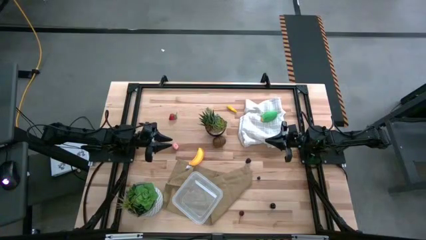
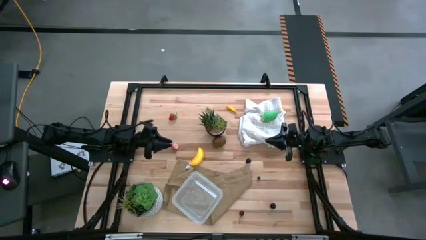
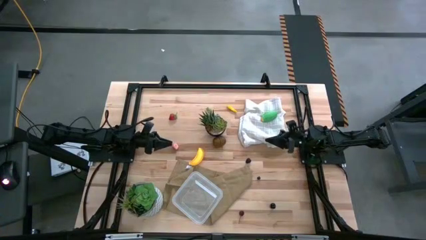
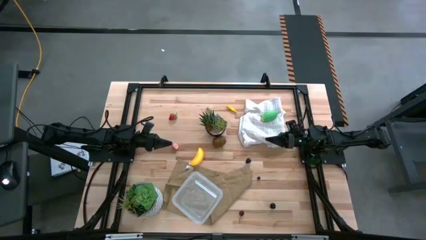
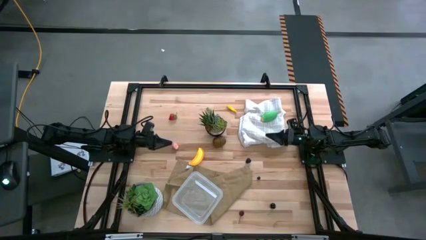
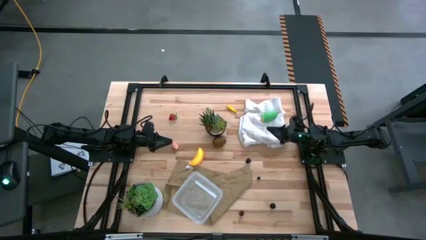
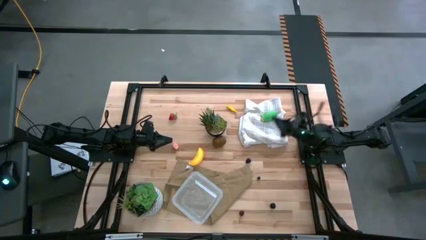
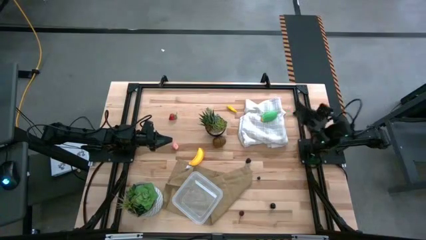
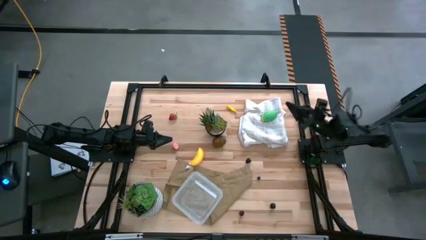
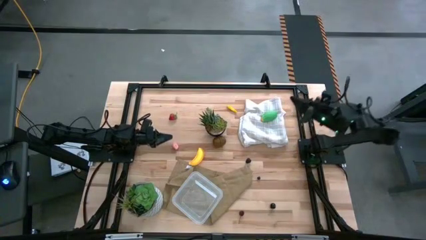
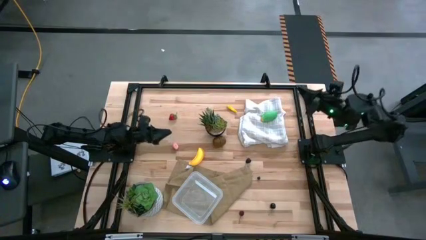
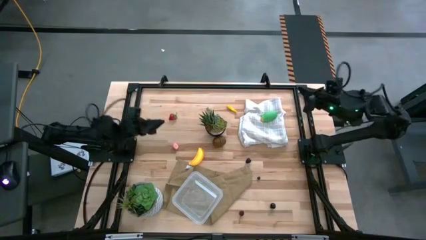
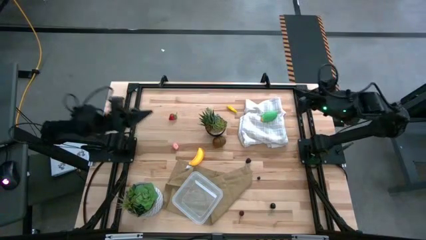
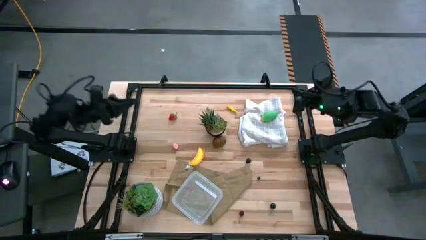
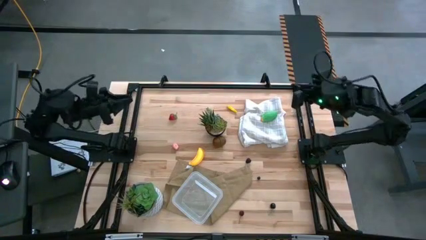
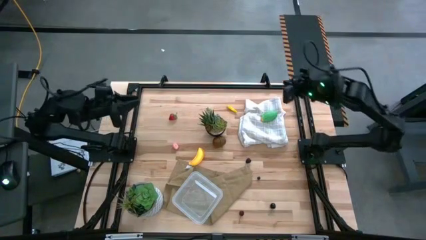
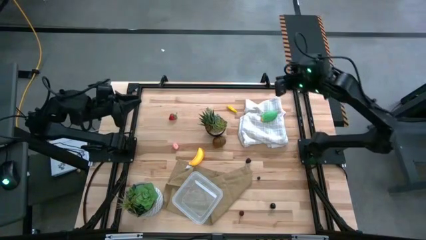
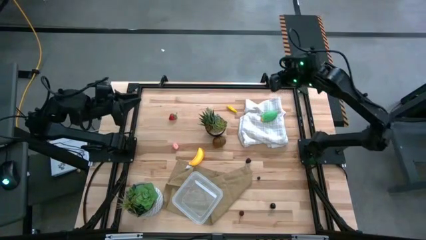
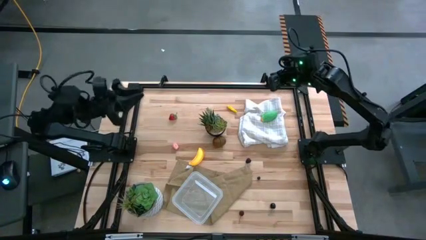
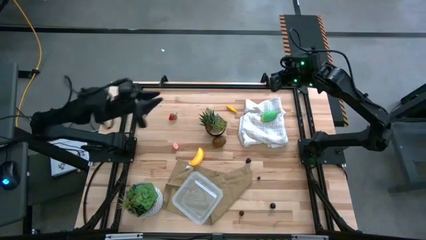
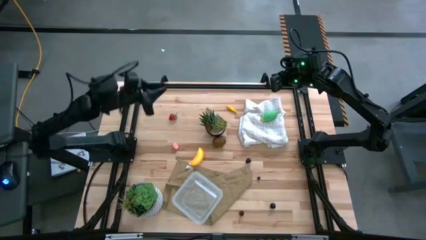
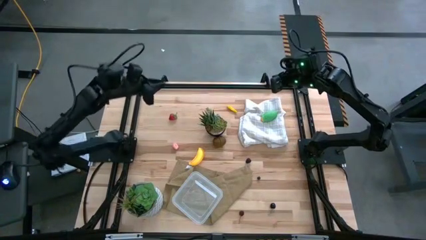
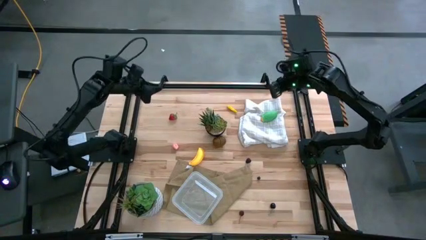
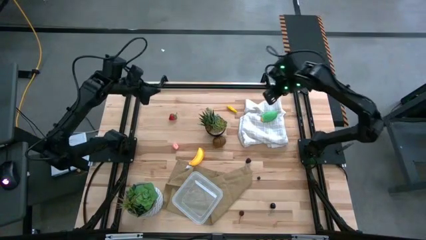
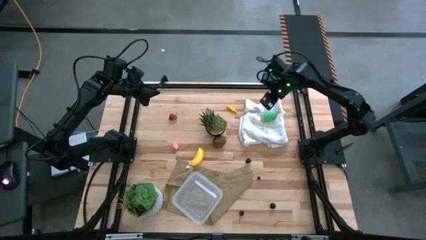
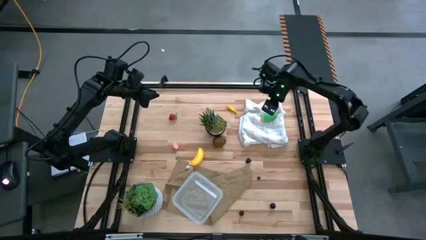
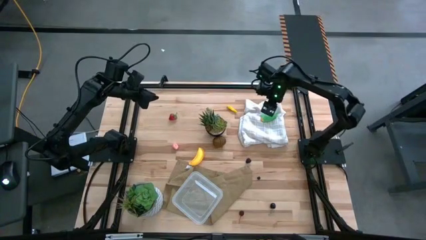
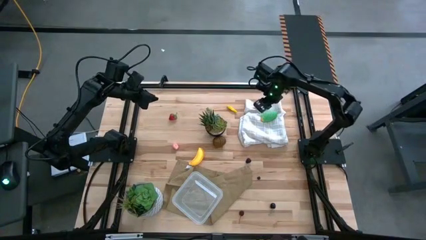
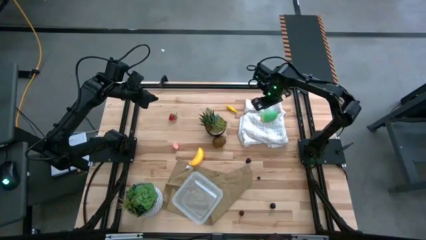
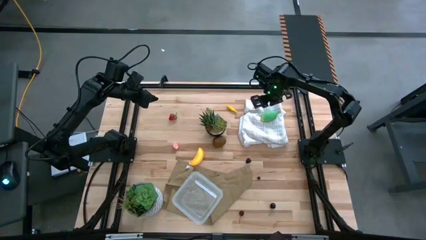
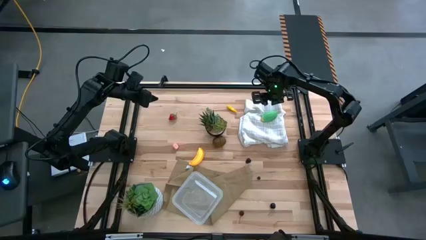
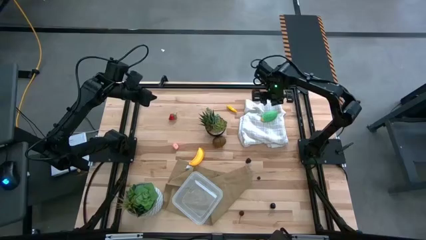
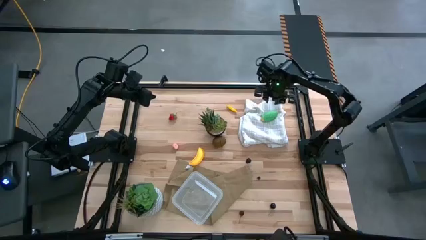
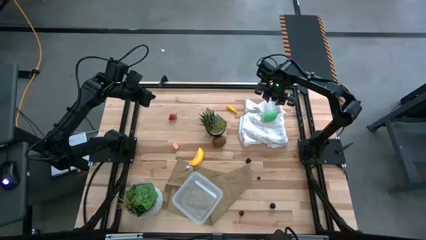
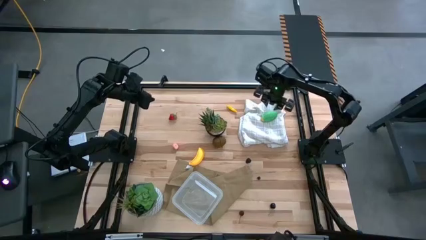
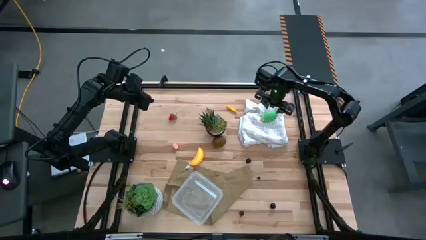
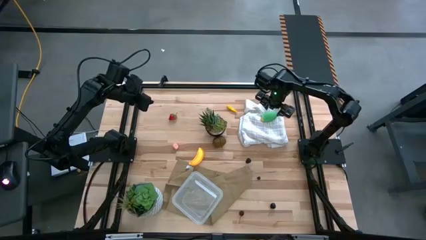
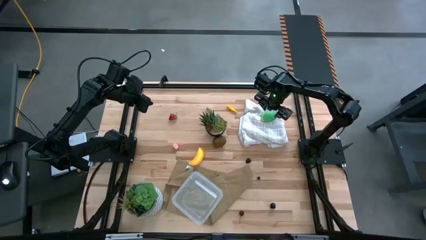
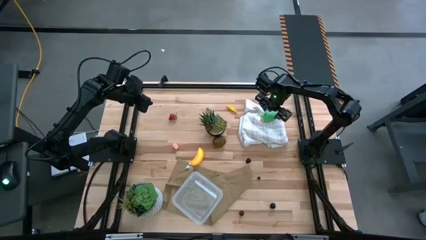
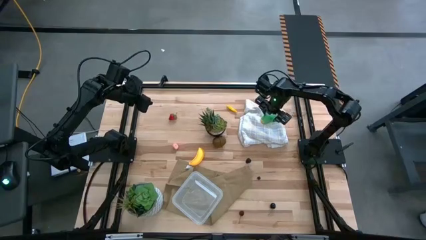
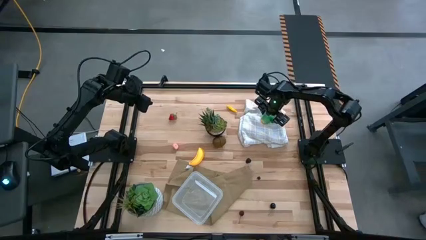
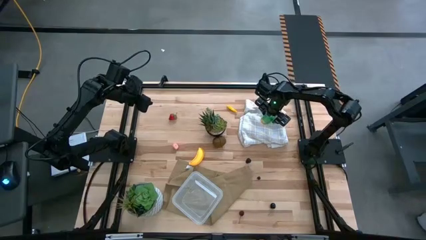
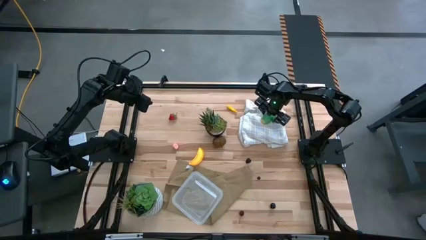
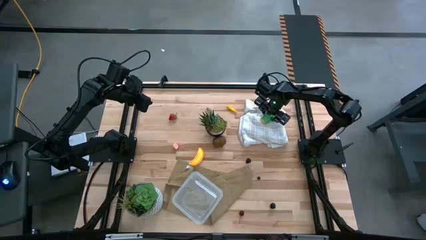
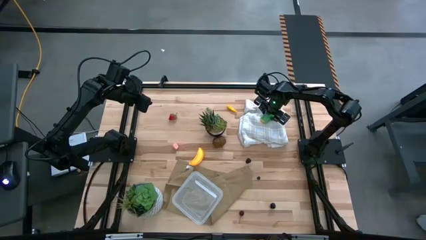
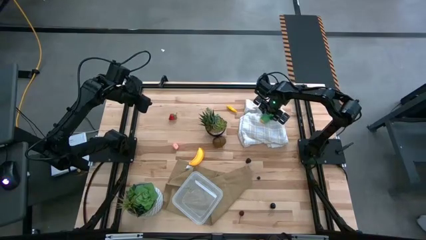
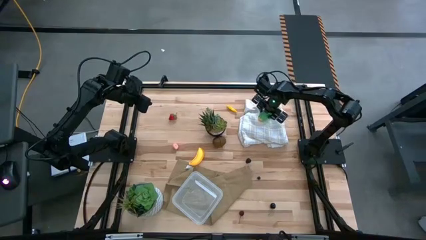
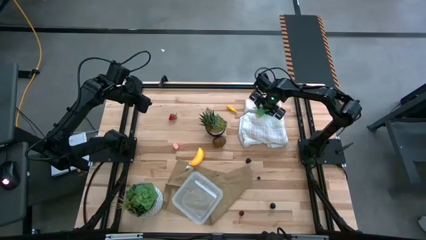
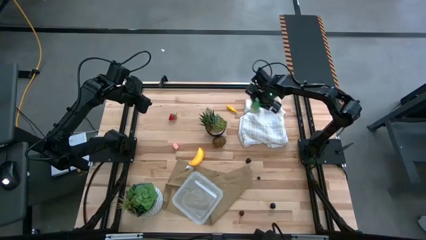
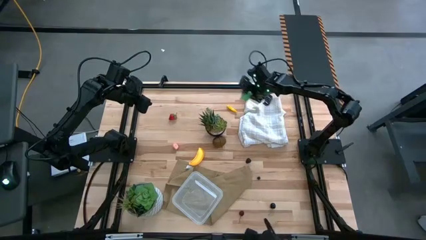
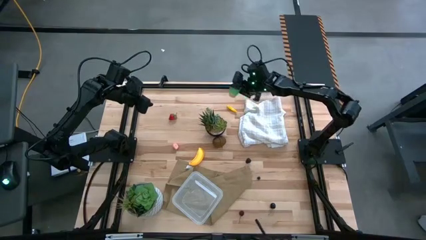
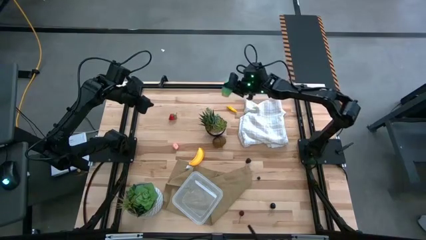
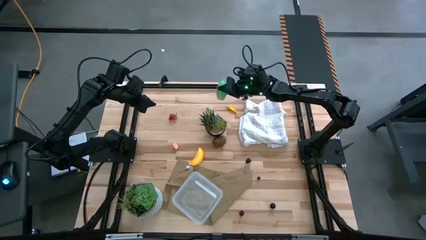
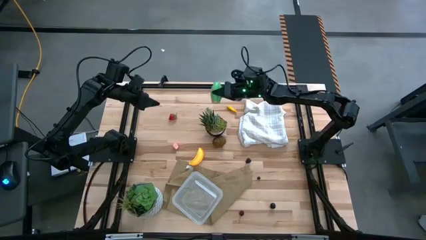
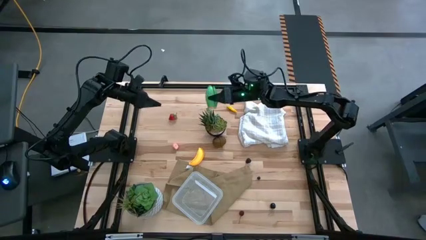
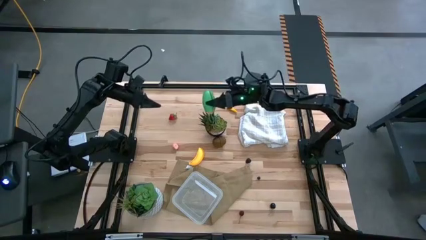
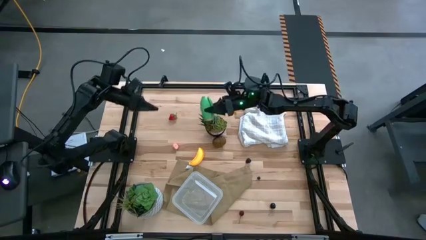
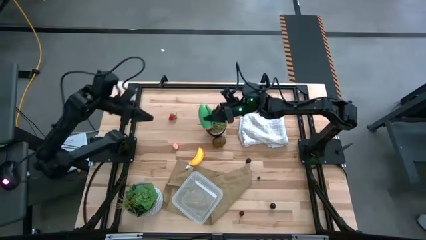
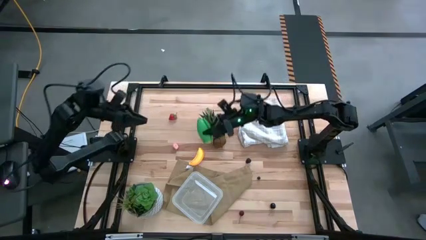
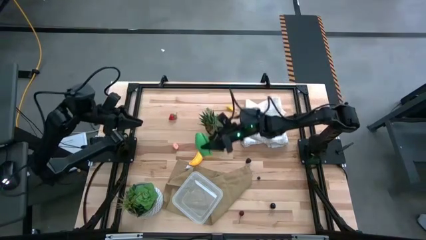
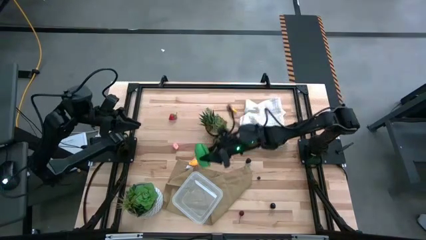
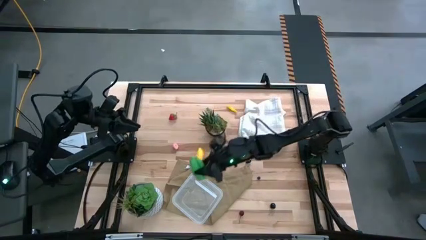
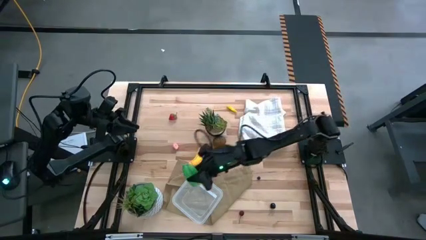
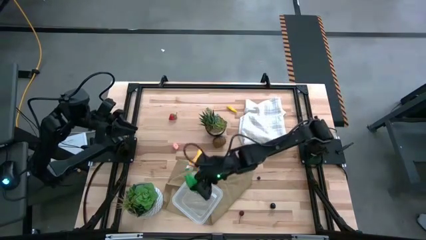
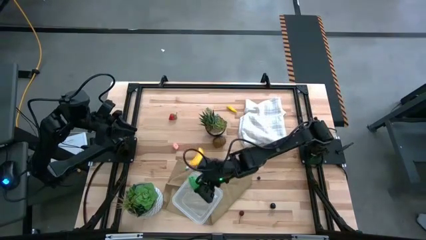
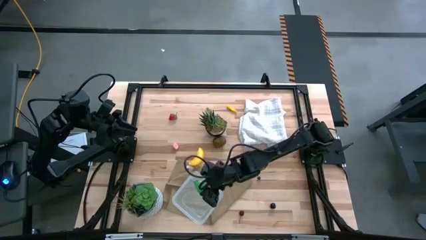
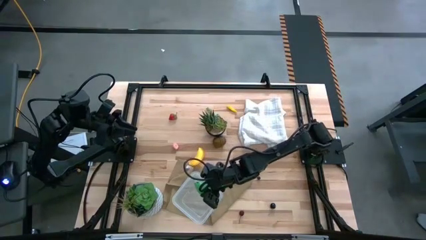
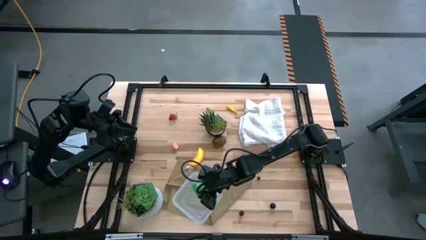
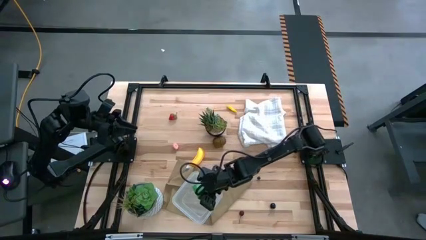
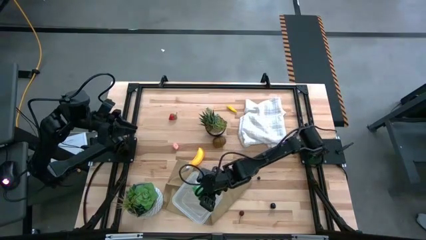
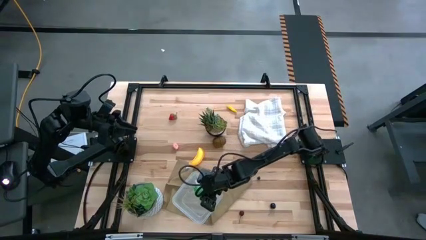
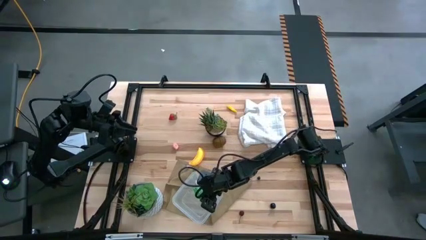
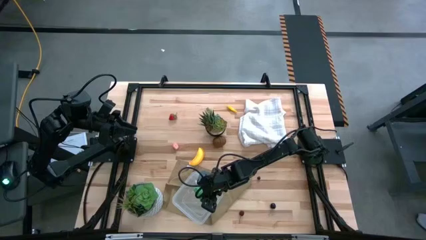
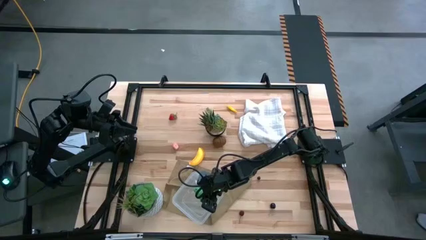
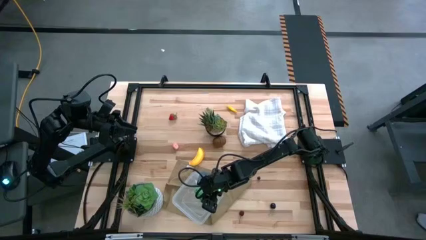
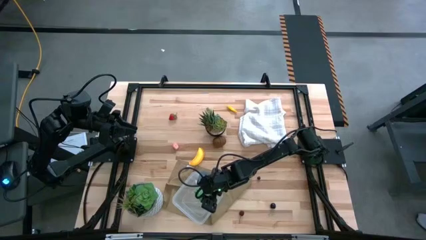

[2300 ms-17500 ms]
Task: Pick and placing Produce into tupperware
Put the green corn into the container
